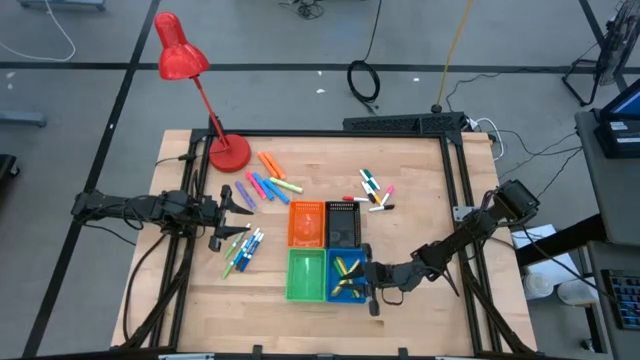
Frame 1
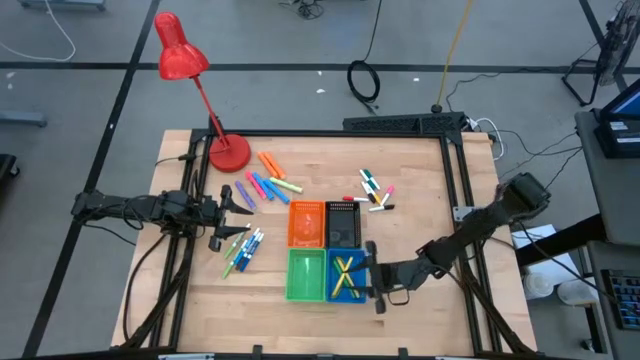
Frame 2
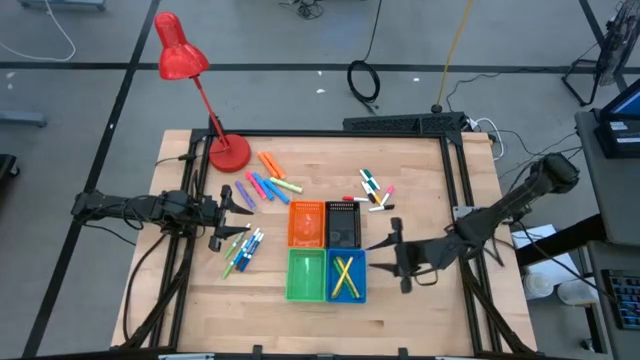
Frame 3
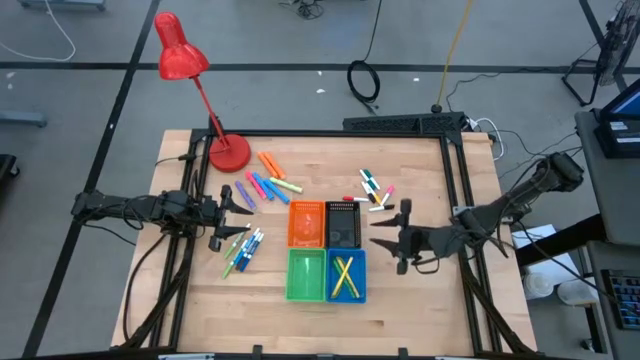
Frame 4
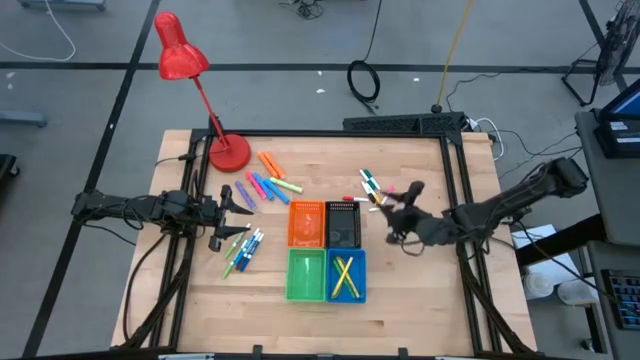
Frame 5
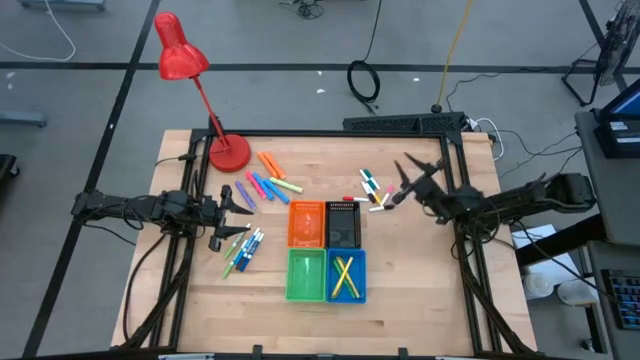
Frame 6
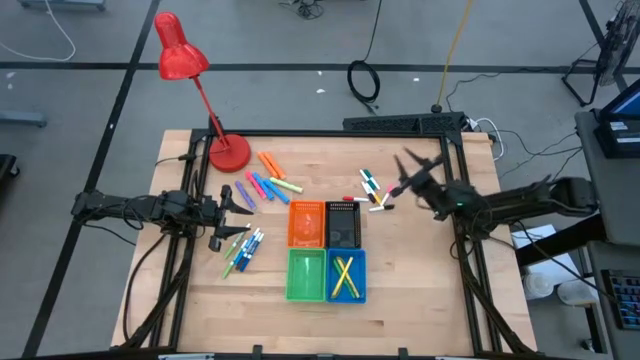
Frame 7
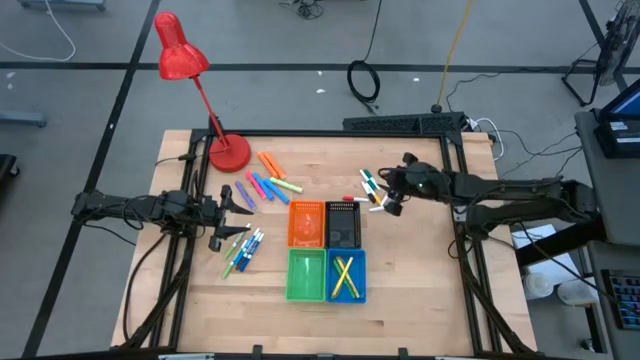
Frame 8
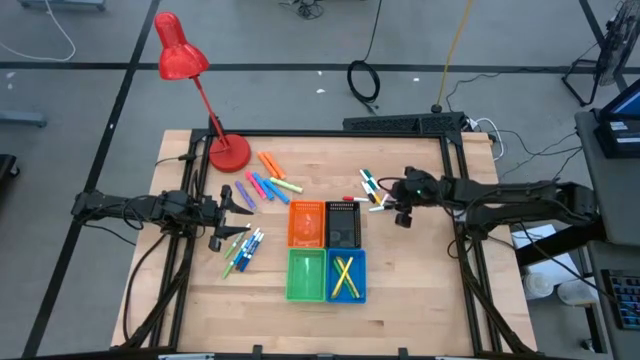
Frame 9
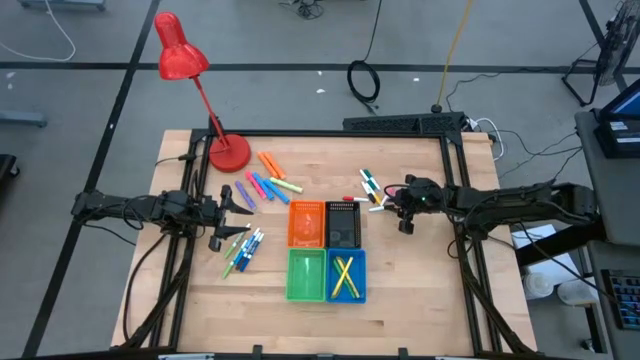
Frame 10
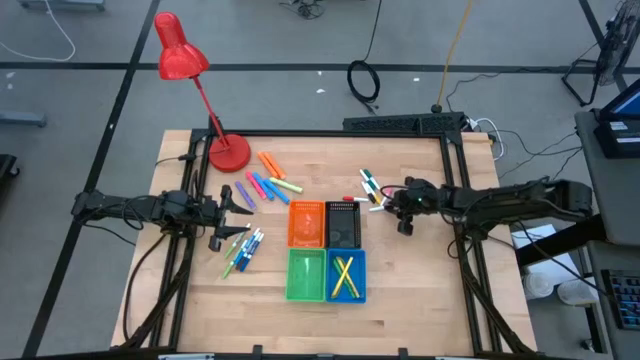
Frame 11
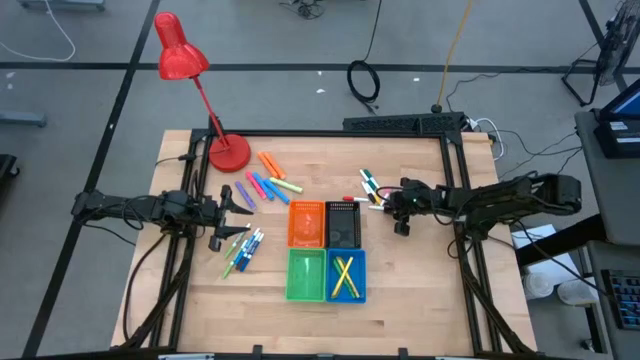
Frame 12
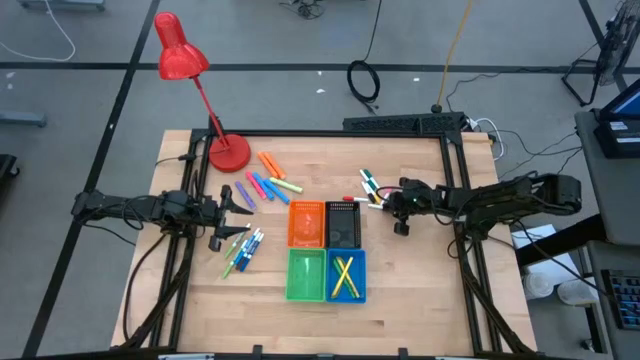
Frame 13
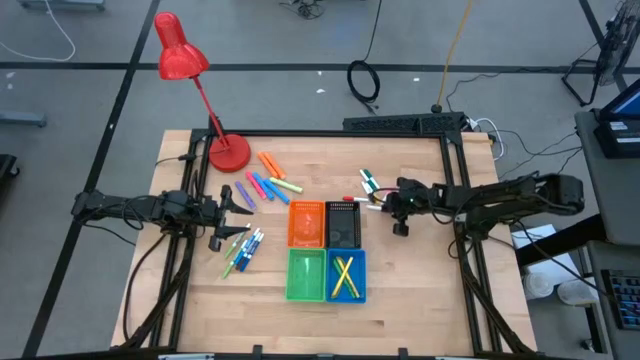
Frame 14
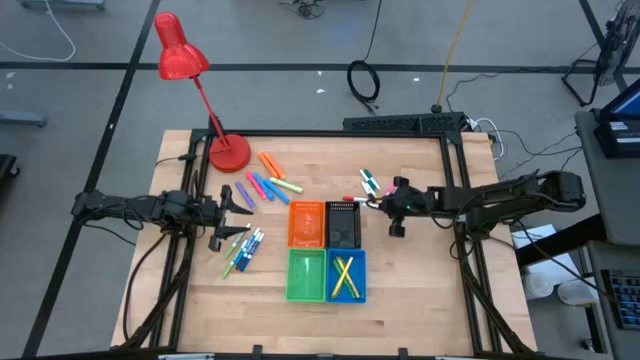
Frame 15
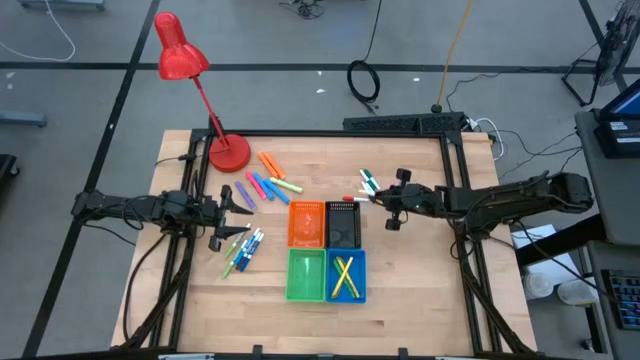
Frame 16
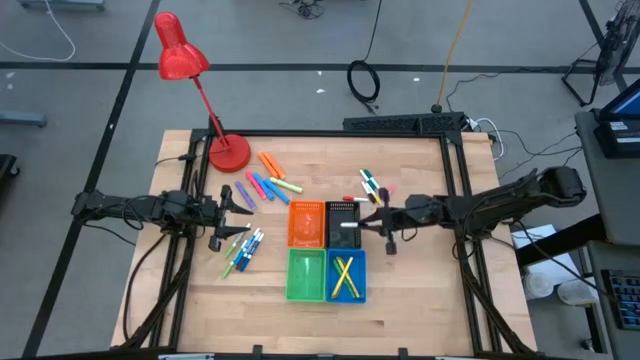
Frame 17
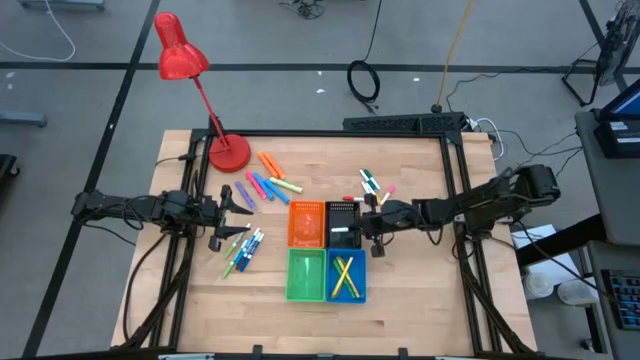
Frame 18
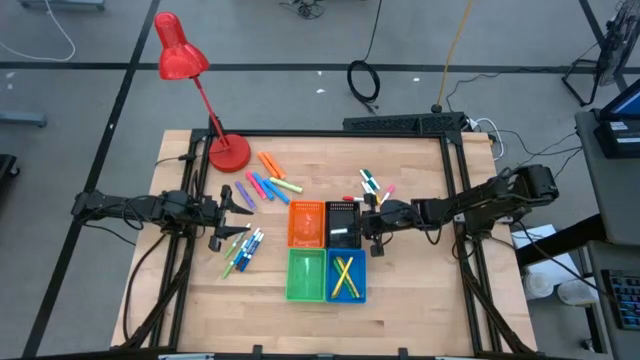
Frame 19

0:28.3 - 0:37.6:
Task: Pick & Place Markers
Put the bottom black highlighter pen into the black basket

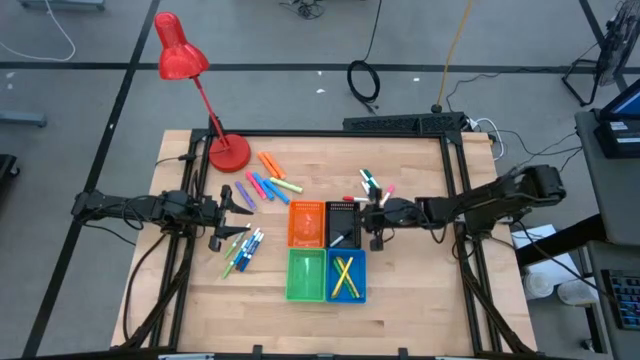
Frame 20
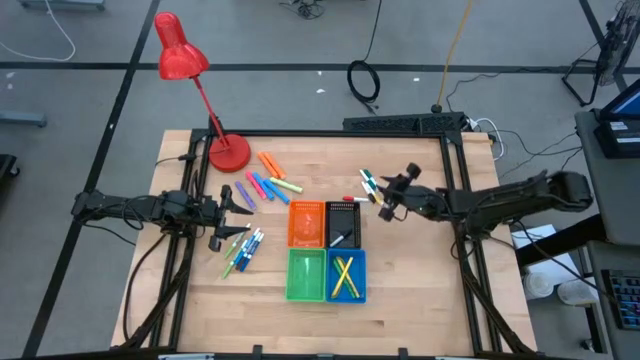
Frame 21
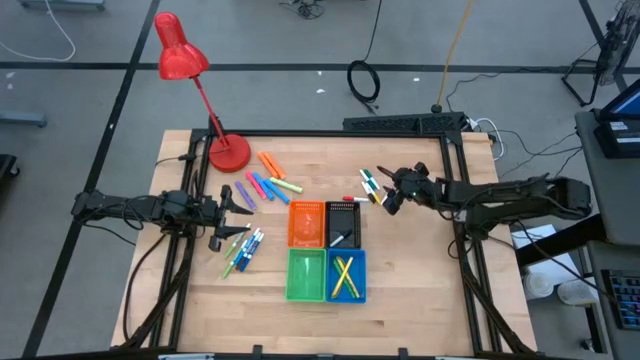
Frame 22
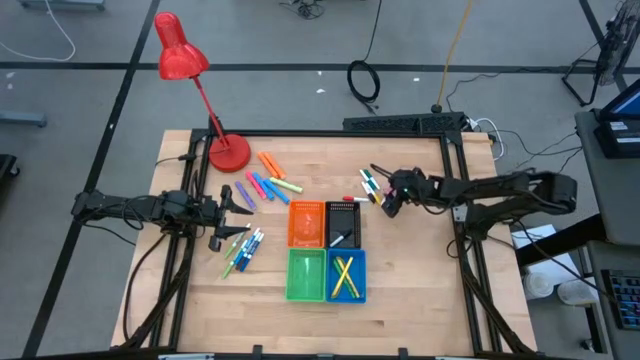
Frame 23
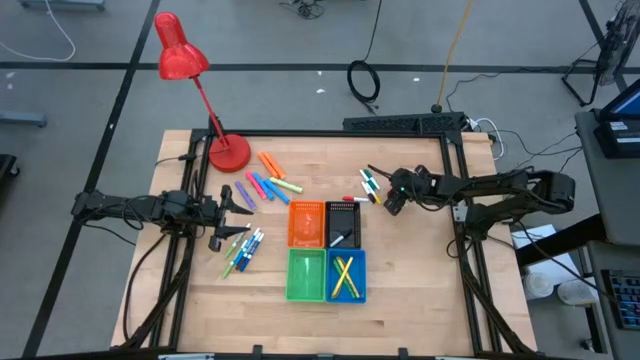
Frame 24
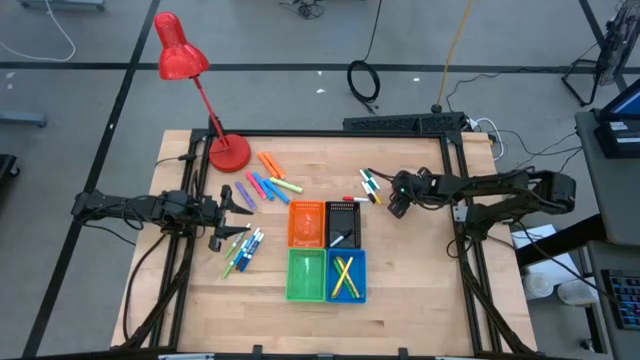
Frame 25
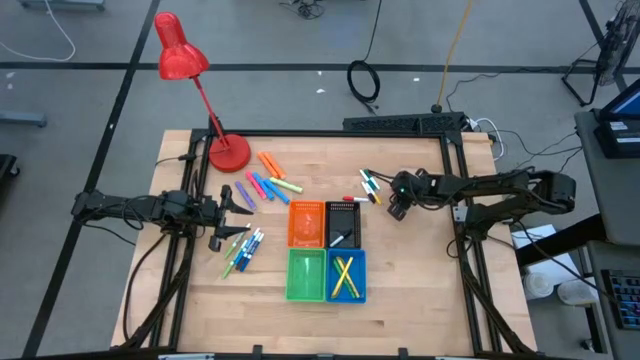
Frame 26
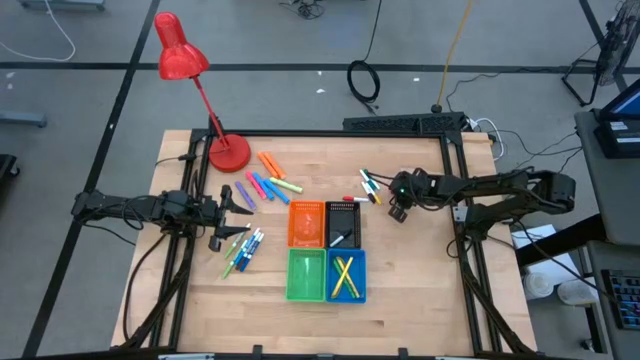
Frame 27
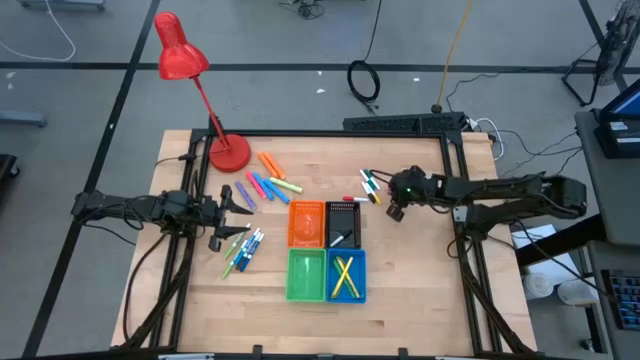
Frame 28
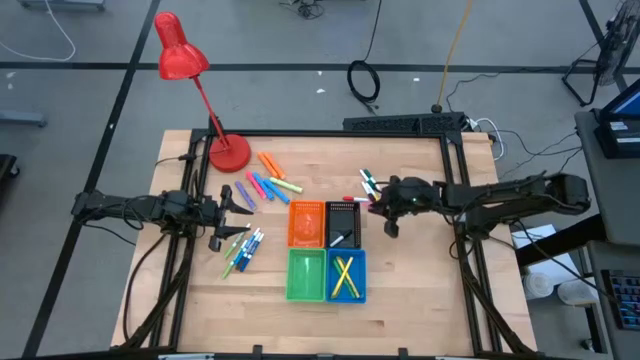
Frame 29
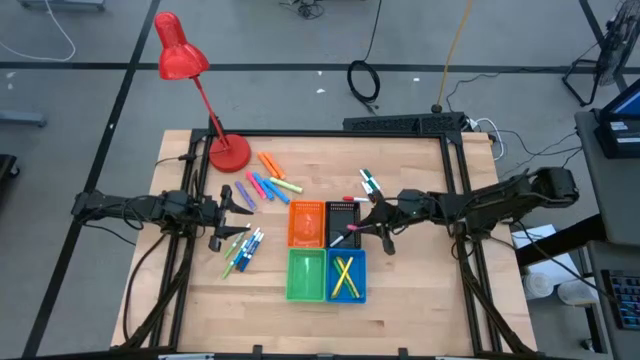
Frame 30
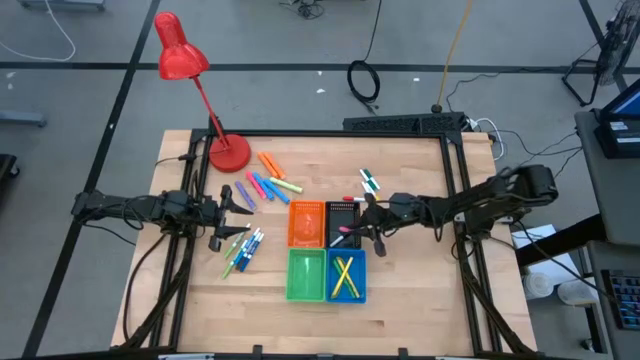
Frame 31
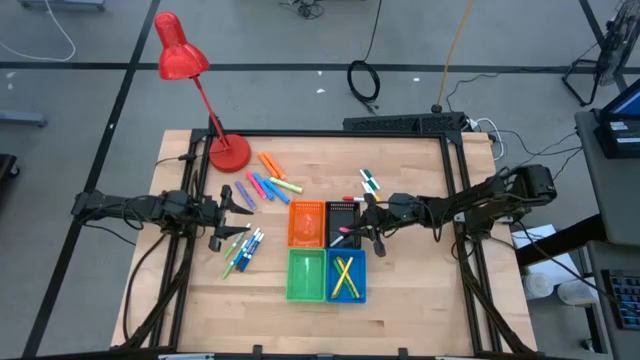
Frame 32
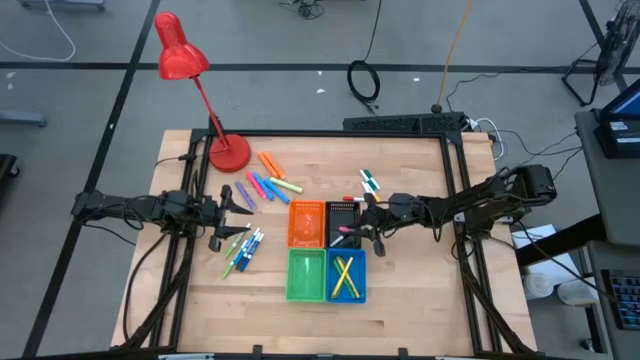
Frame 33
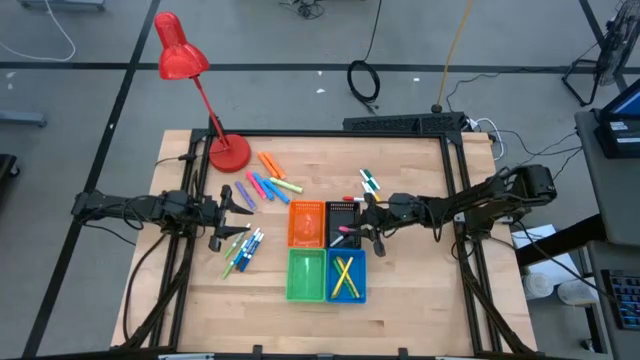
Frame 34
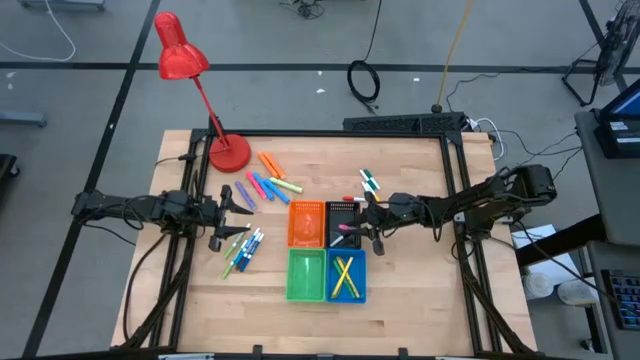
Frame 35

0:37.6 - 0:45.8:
Put the pink highlighter pen into the black basket

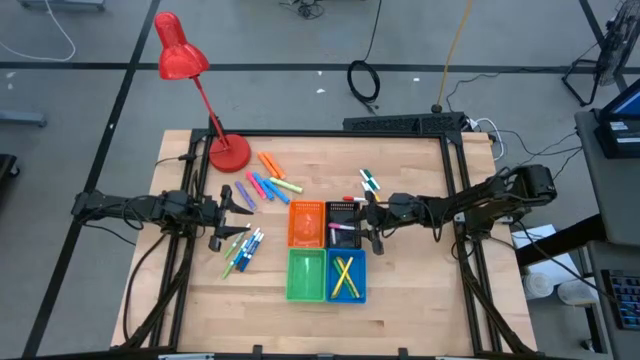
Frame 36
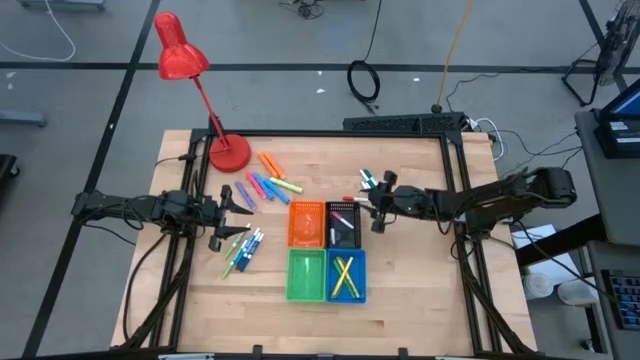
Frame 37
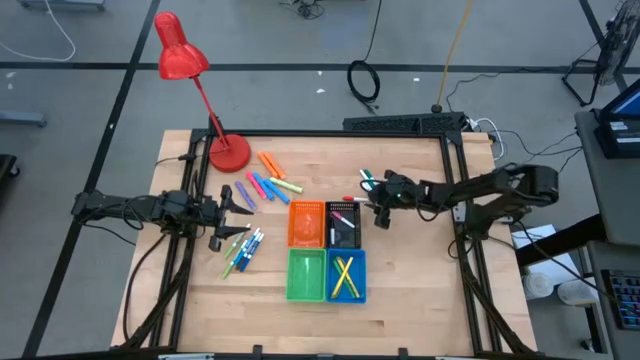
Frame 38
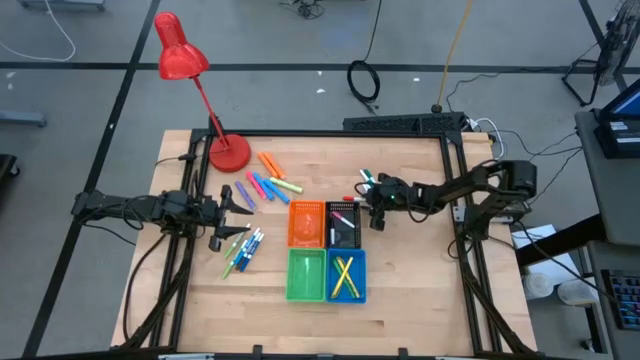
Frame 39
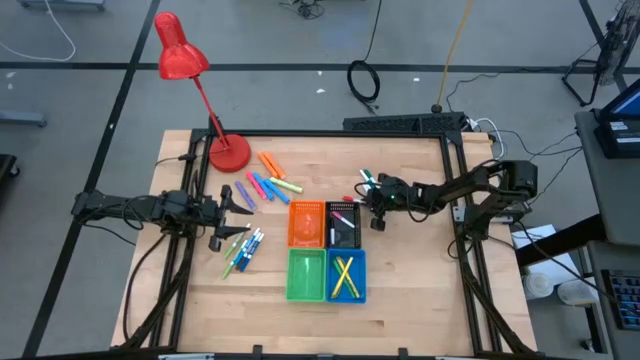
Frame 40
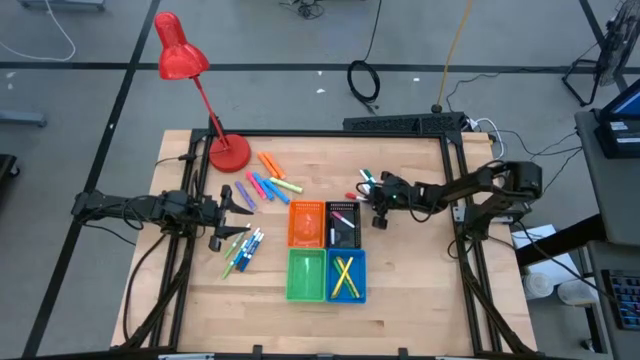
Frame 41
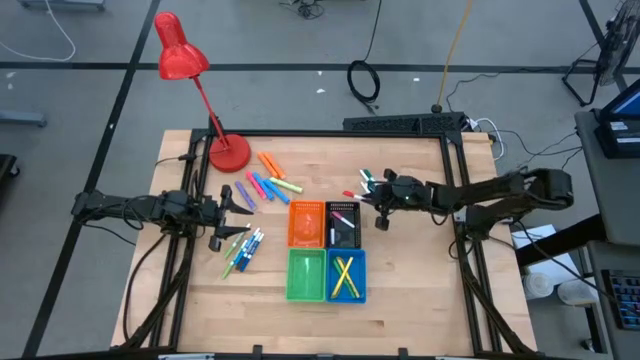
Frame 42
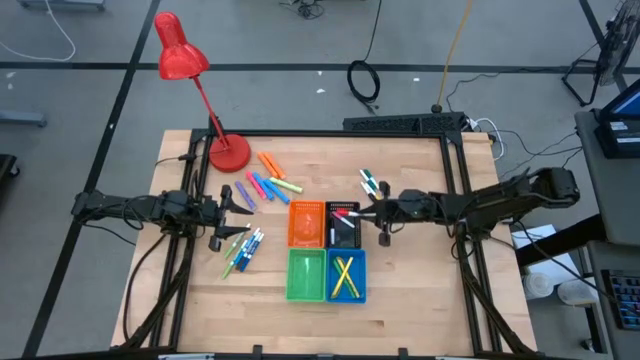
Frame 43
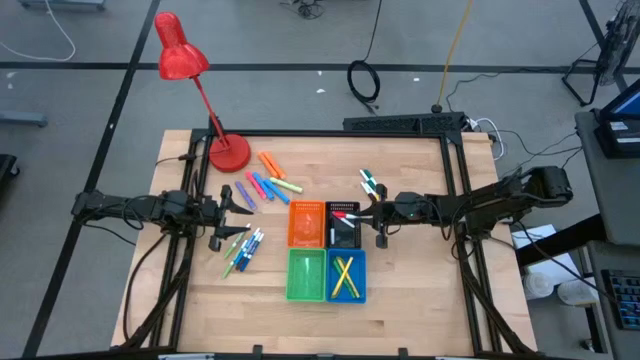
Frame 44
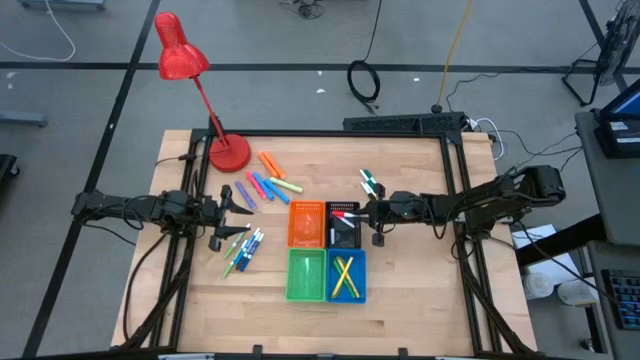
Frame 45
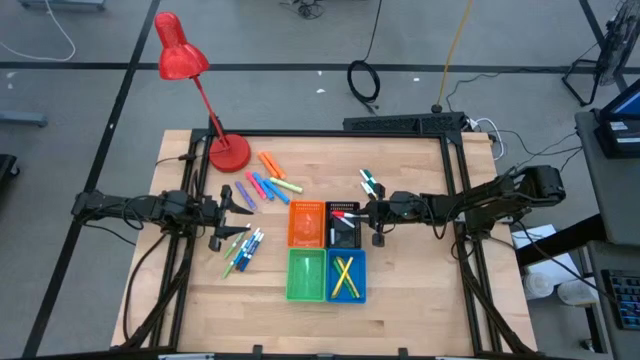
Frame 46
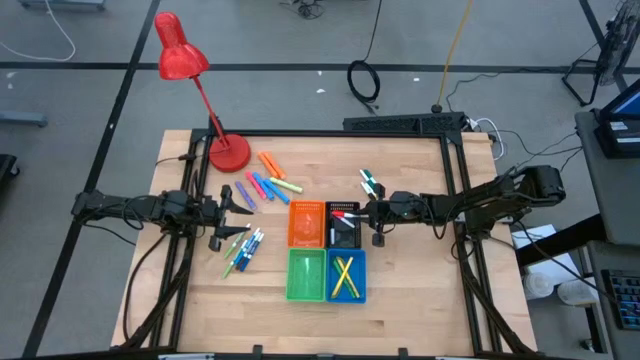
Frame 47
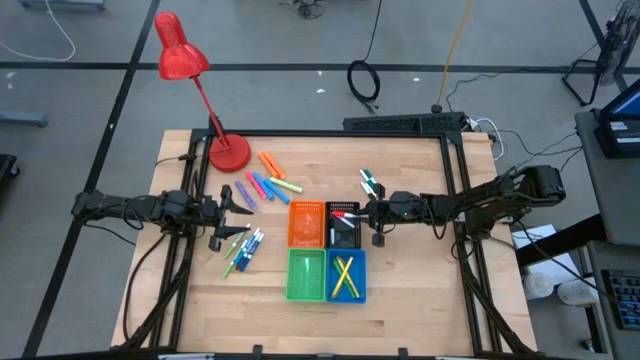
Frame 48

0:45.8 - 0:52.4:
Put the red highlighter pen into the black basket
